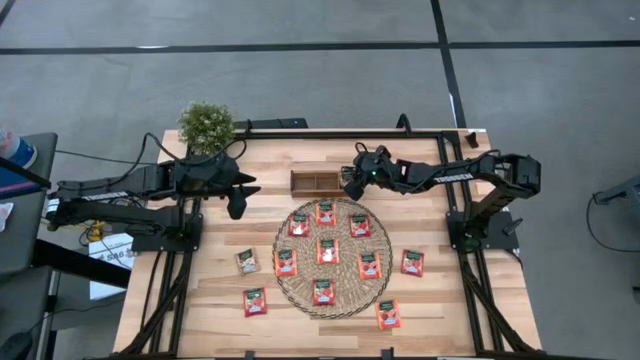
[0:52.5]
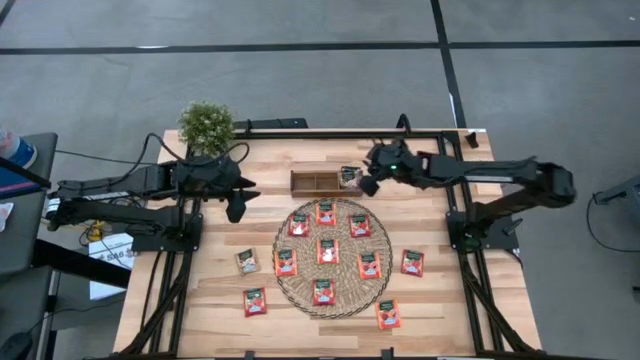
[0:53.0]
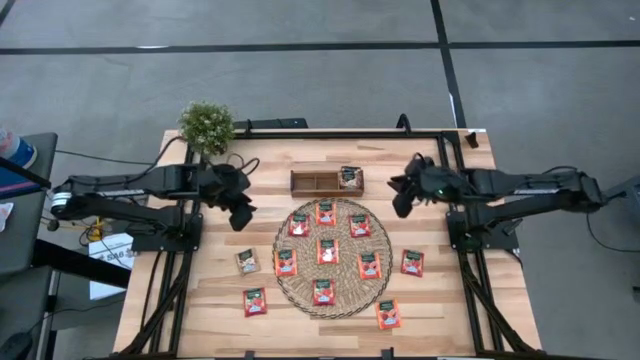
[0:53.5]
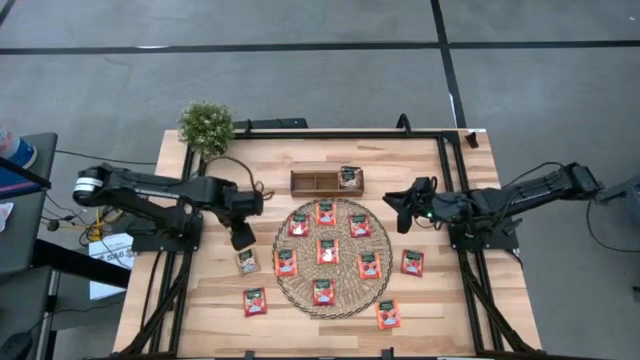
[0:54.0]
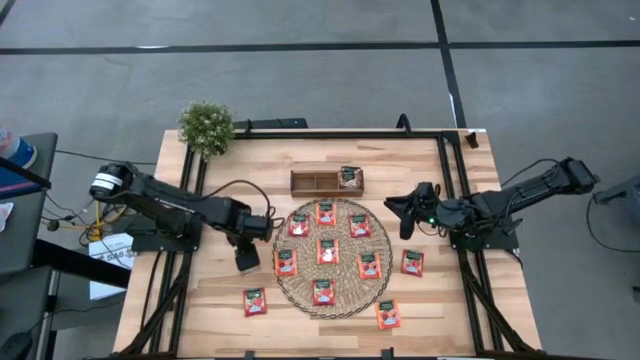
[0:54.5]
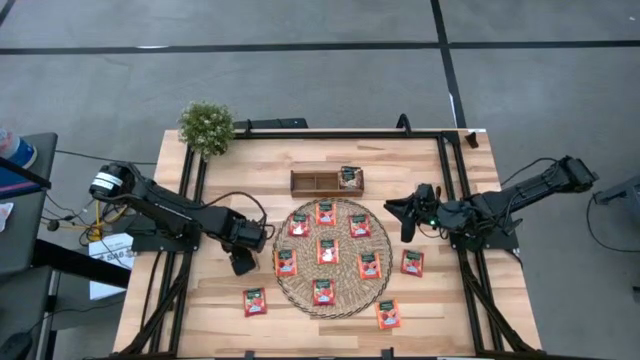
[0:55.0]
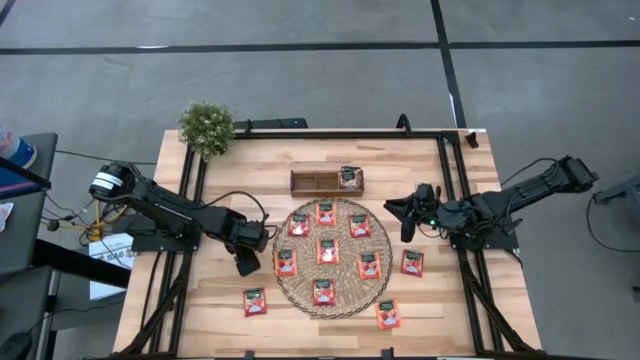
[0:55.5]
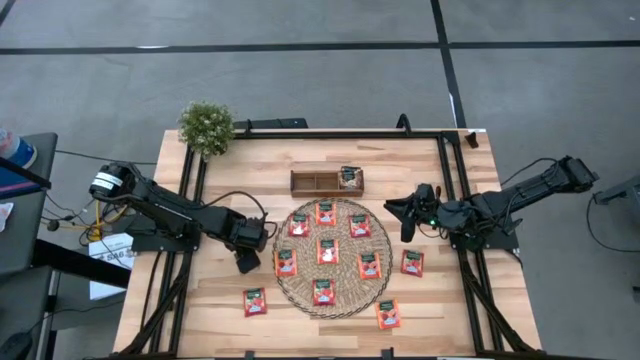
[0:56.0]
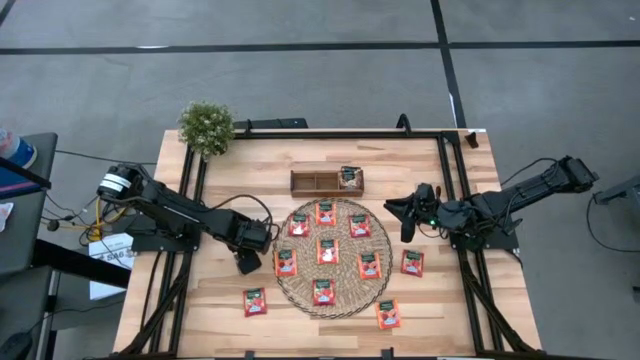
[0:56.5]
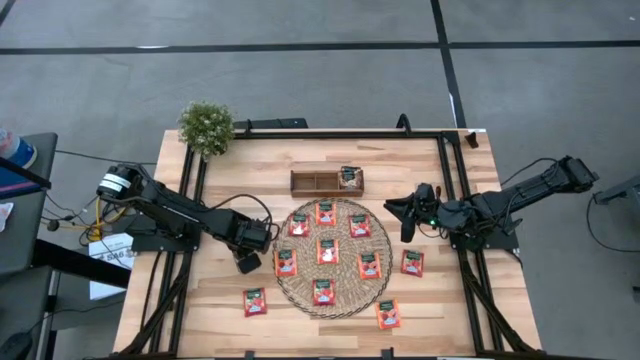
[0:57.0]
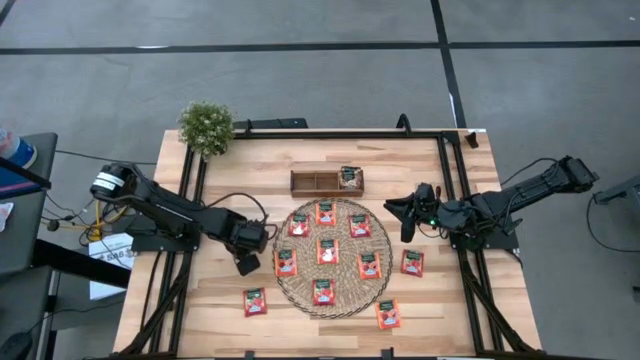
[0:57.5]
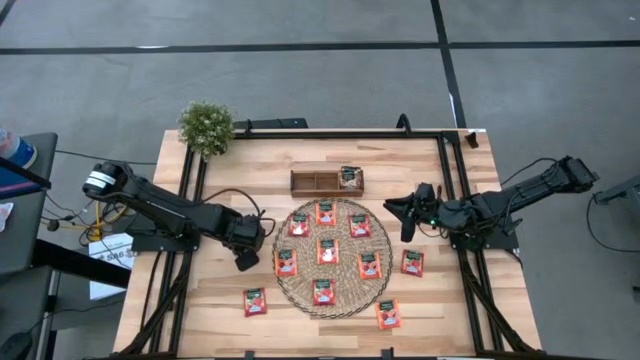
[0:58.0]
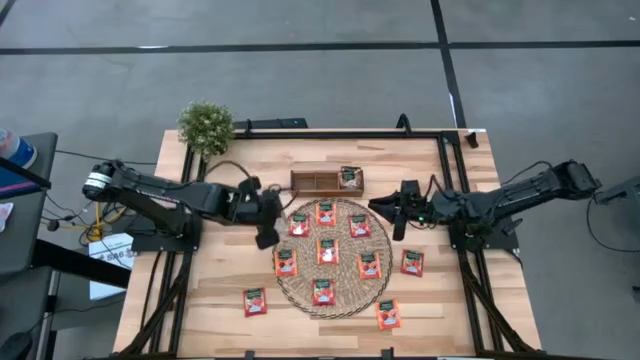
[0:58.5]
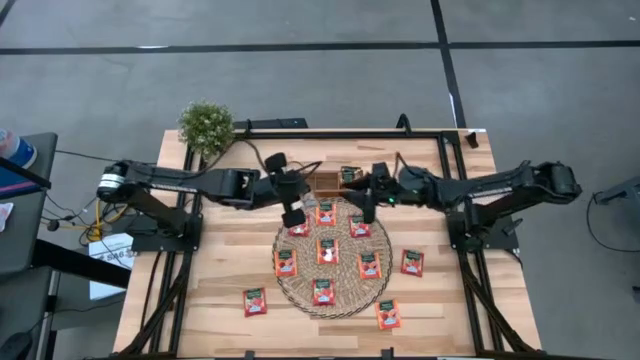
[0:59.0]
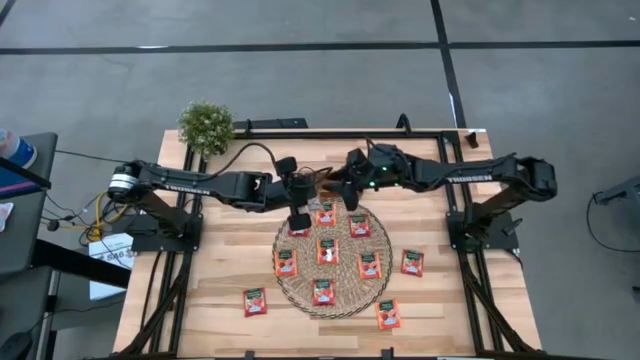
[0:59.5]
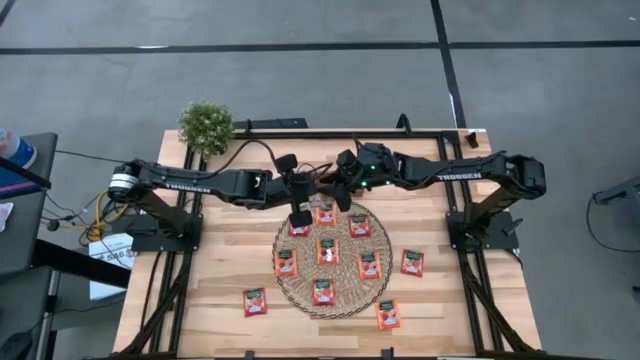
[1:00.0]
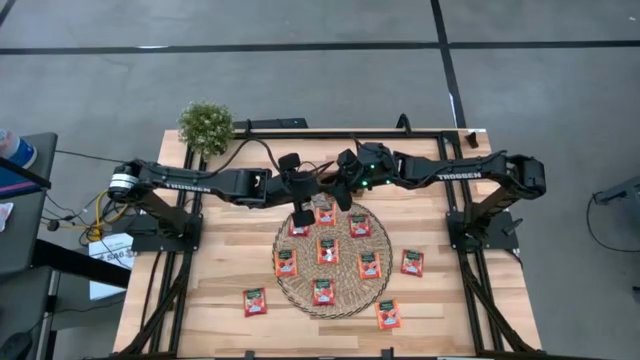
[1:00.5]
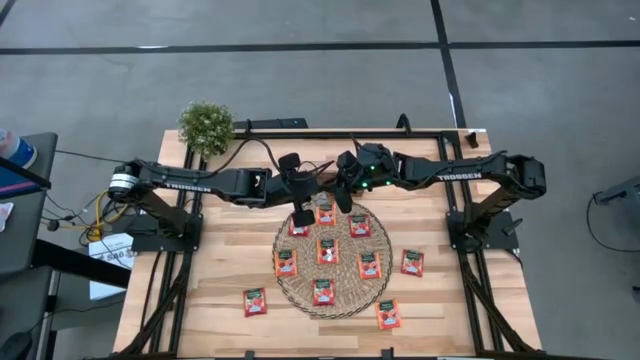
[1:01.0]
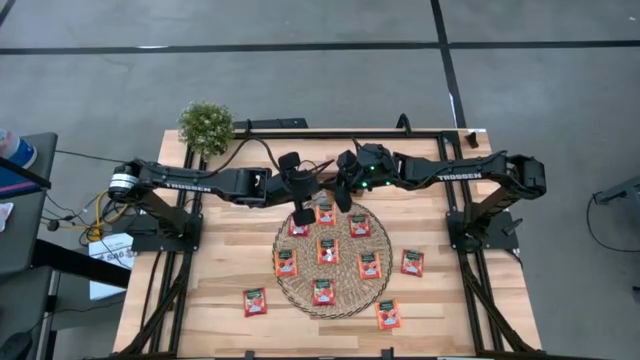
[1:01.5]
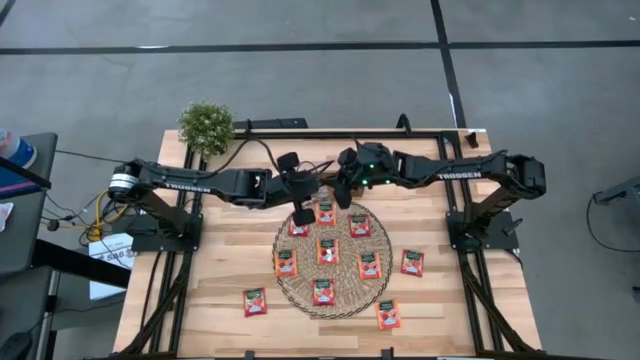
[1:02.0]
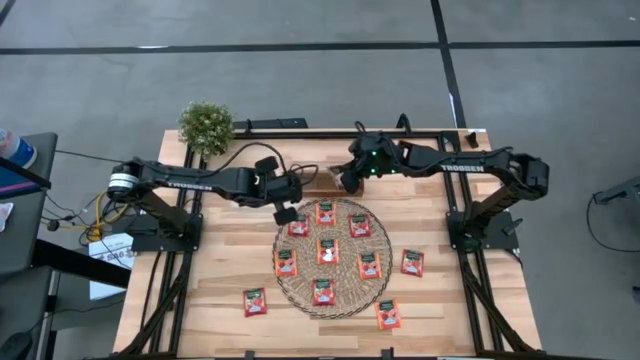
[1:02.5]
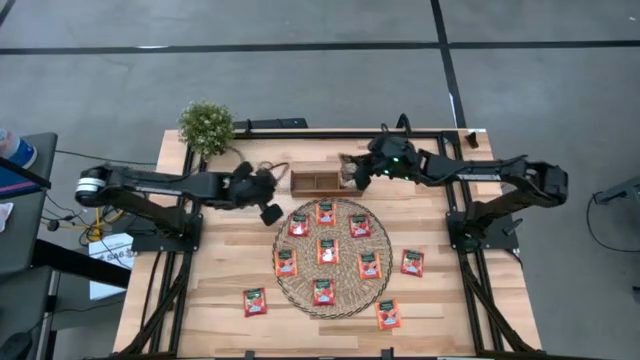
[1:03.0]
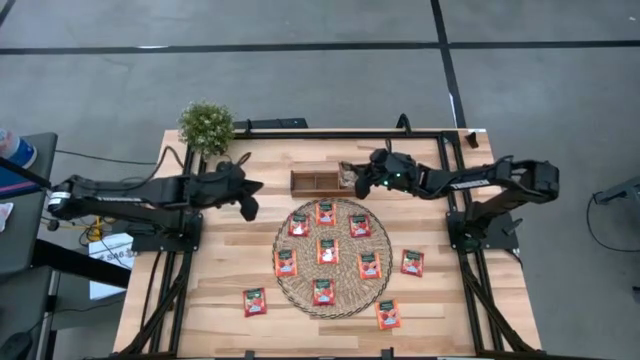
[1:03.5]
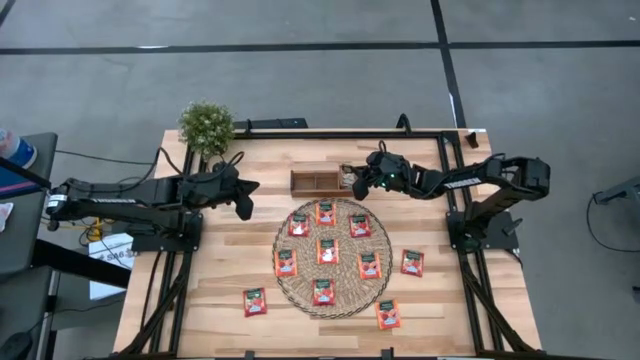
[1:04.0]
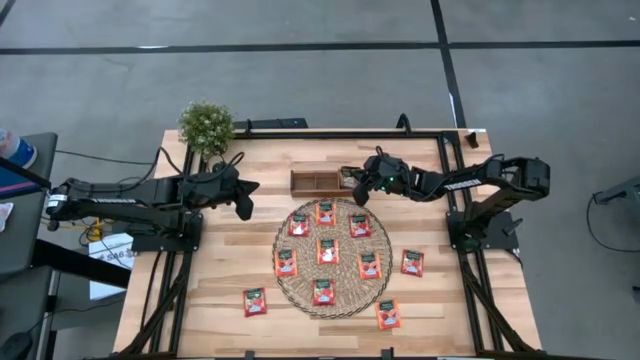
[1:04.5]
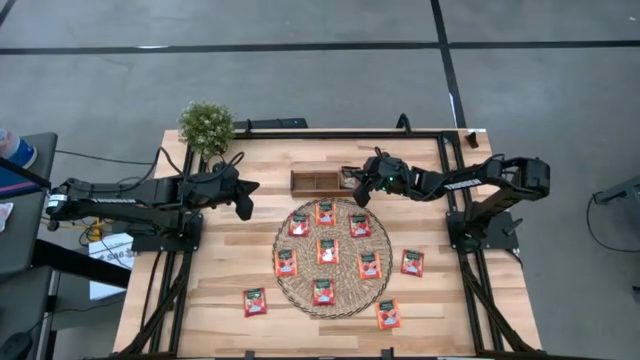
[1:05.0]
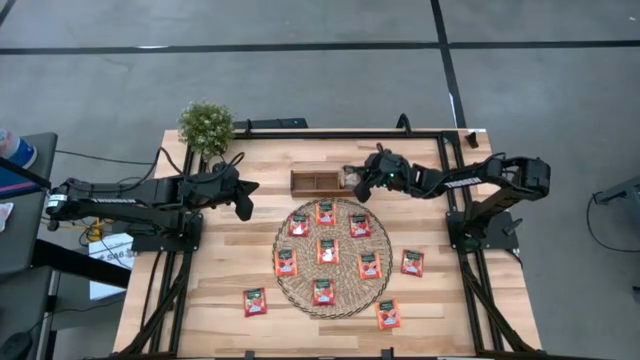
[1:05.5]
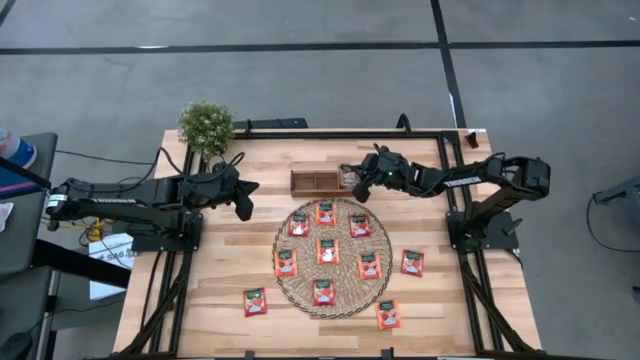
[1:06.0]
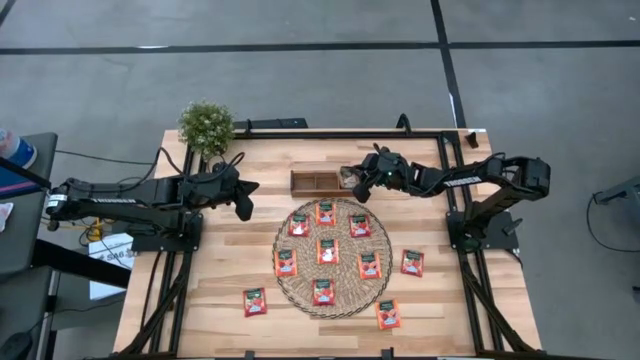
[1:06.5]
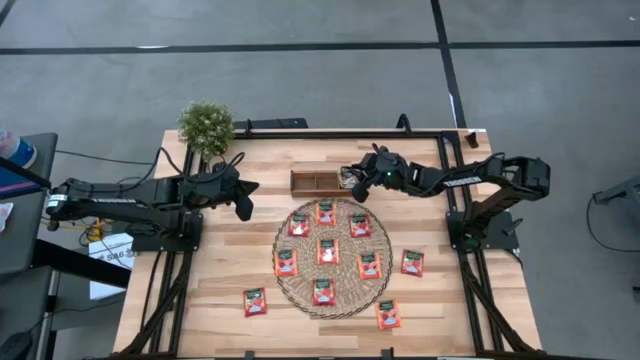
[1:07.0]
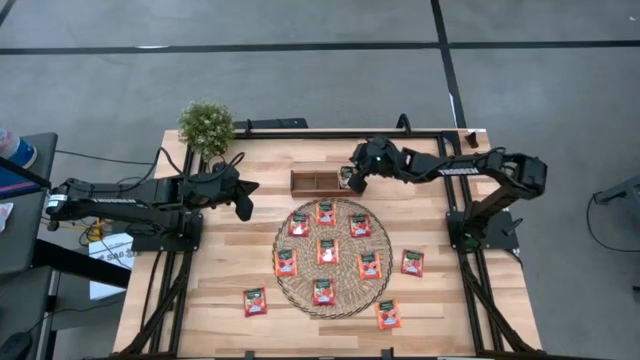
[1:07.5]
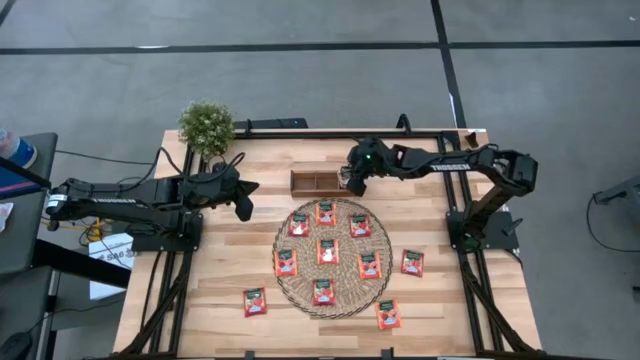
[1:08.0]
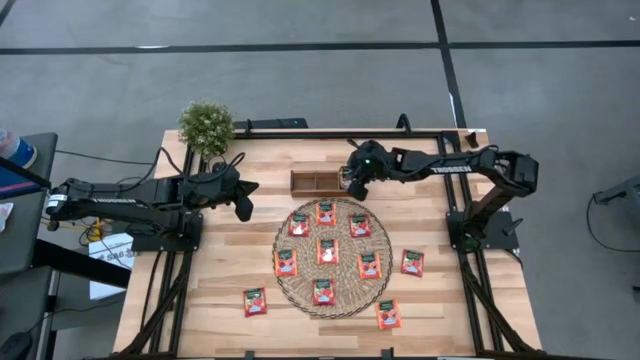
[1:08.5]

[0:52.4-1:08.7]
Task: Pick & Place Tea
Put the brown tea bag into the right section of the wooden organizer

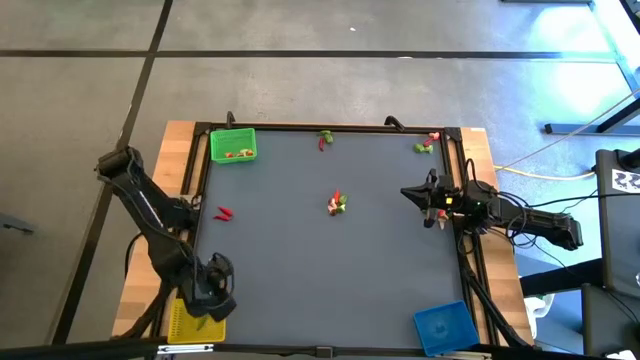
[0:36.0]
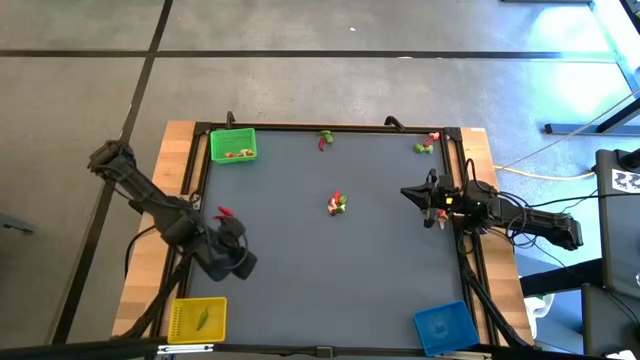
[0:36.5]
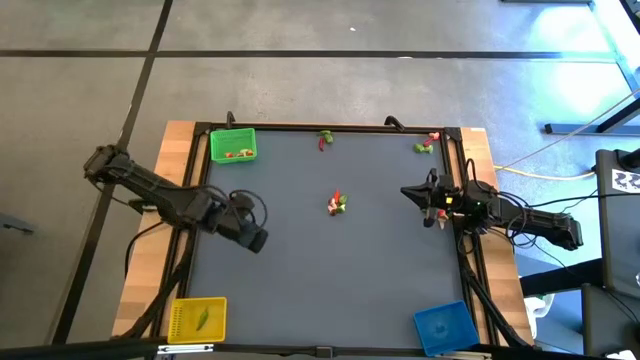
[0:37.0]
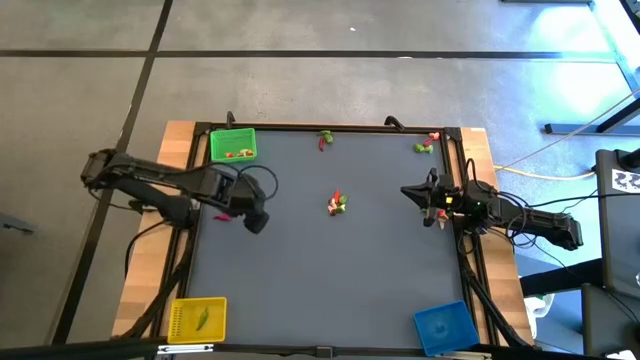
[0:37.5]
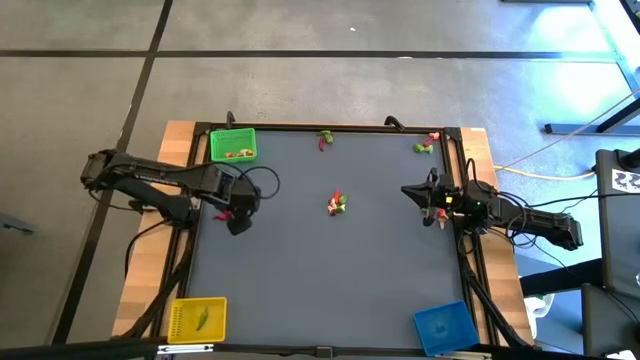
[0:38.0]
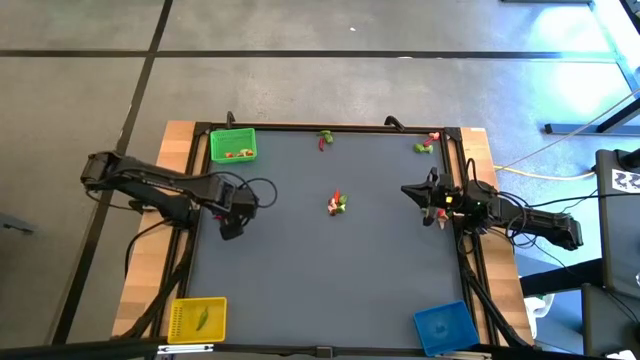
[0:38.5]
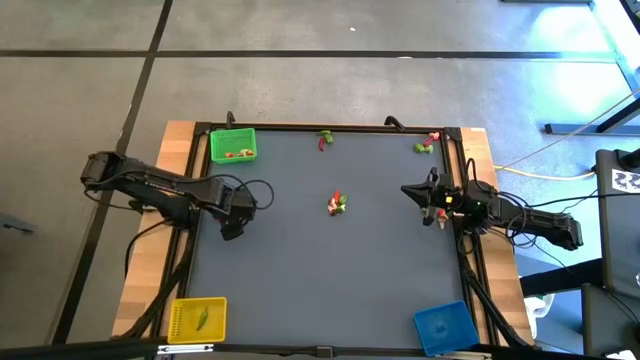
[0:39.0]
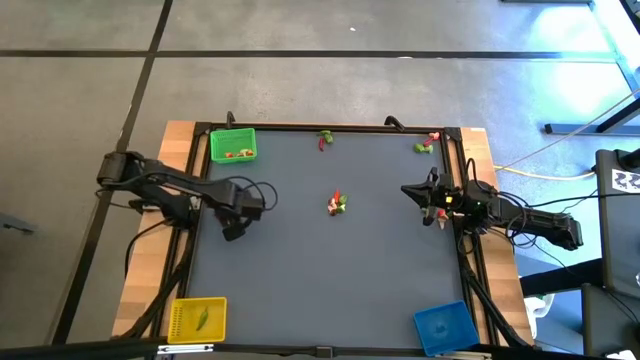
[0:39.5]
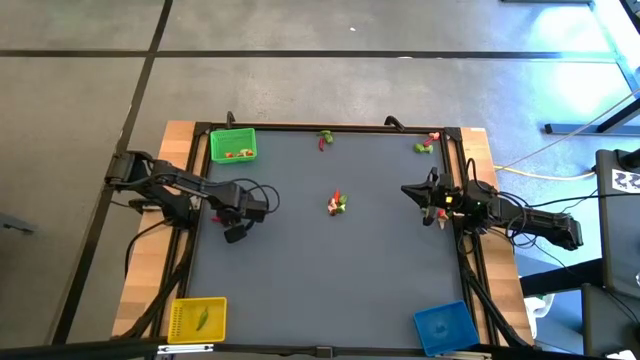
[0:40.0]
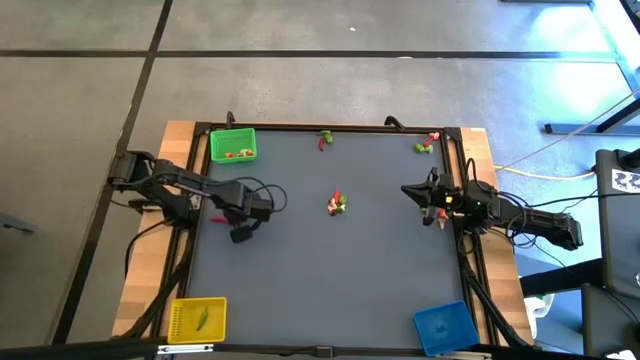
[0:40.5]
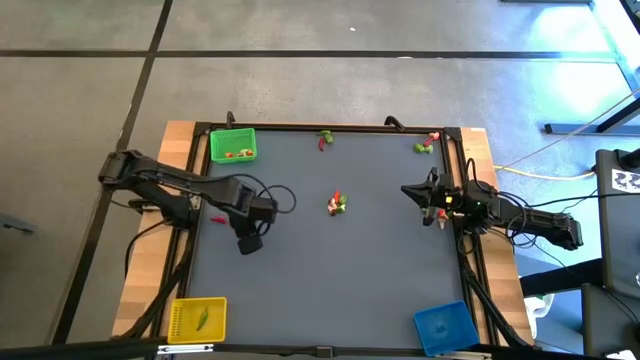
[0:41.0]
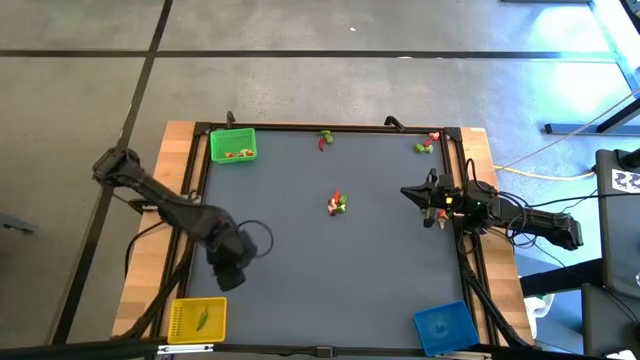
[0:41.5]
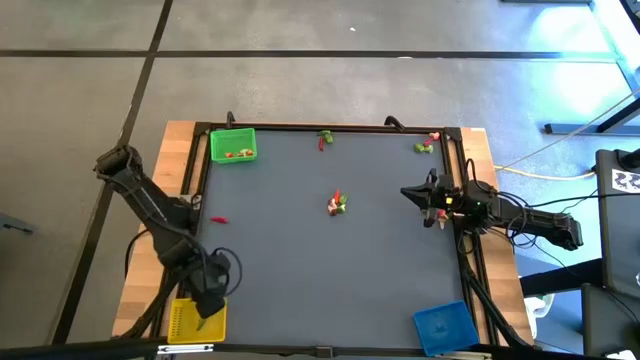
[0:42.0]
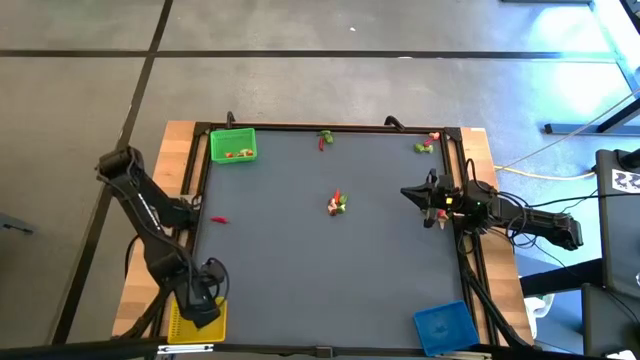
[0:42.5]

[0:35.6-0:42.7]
Task: Sort produce into baskets
Put the red chili pepper into the yellow bin
